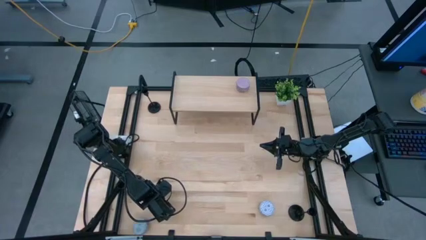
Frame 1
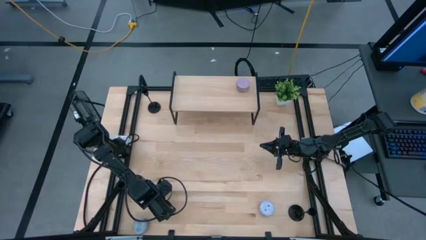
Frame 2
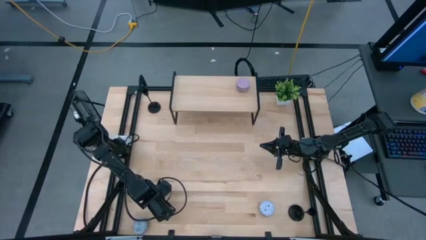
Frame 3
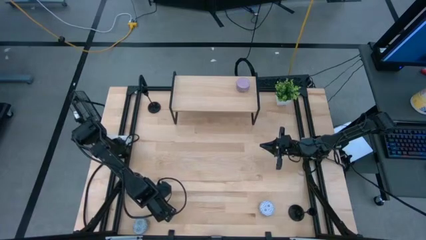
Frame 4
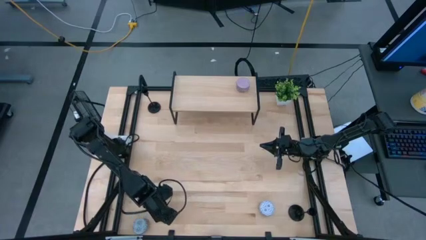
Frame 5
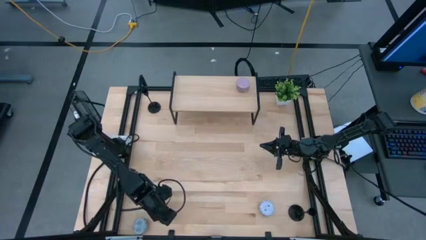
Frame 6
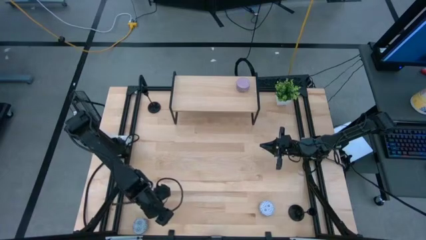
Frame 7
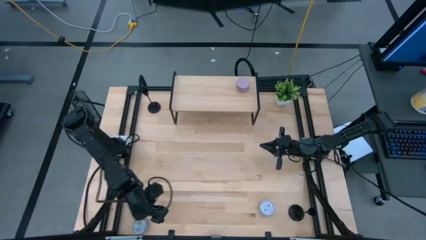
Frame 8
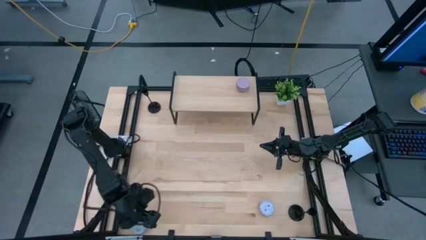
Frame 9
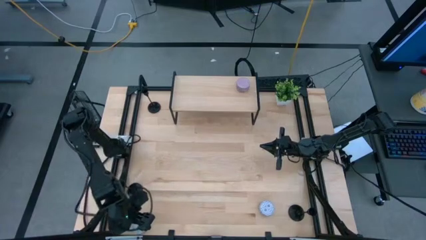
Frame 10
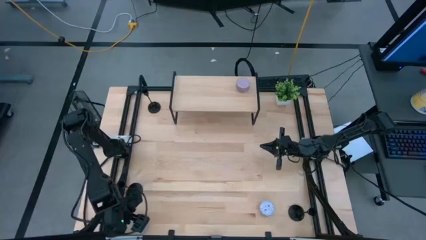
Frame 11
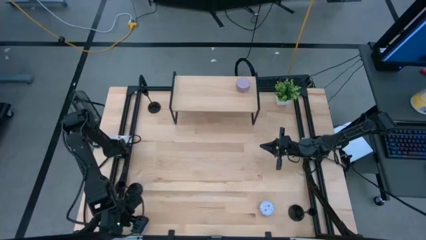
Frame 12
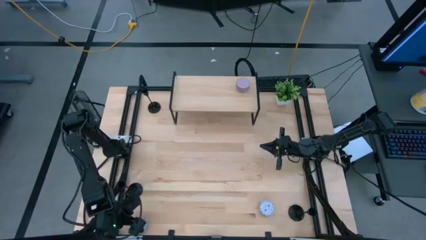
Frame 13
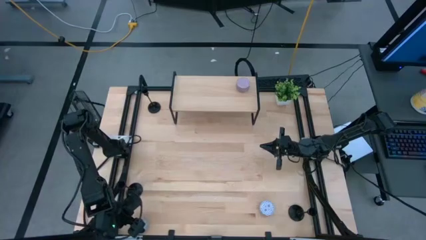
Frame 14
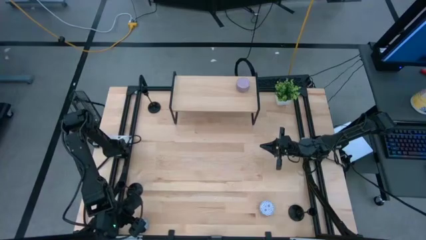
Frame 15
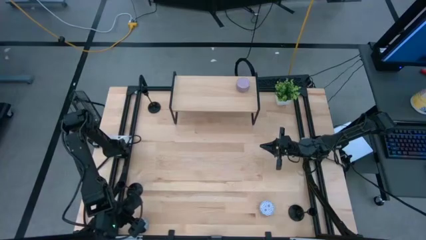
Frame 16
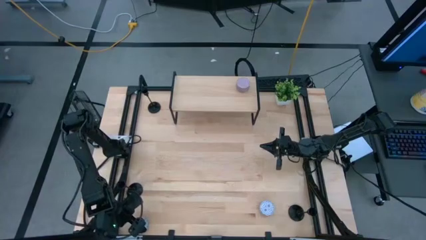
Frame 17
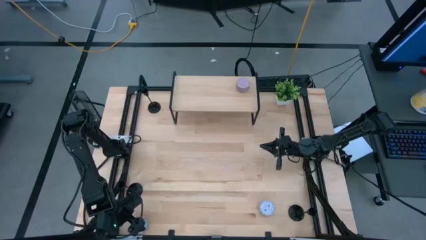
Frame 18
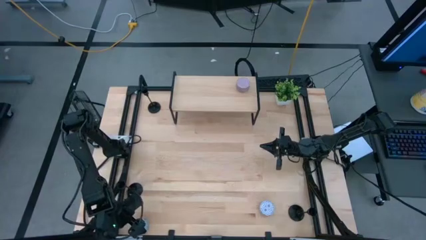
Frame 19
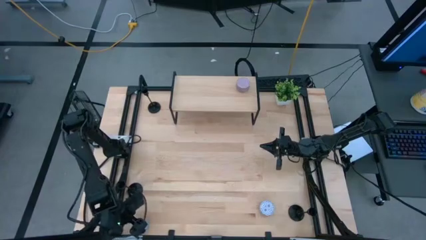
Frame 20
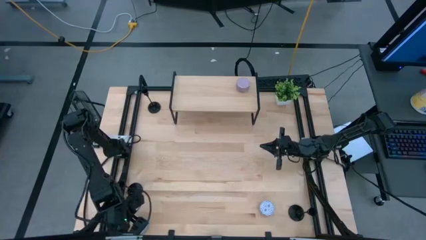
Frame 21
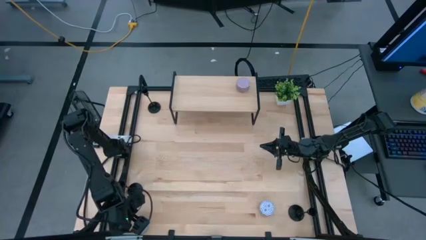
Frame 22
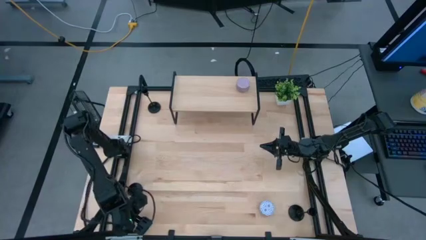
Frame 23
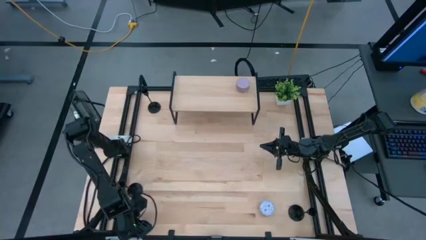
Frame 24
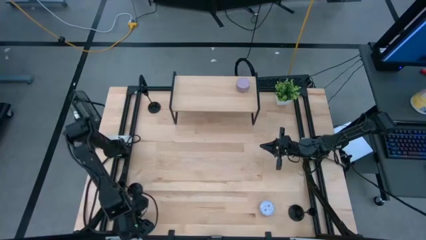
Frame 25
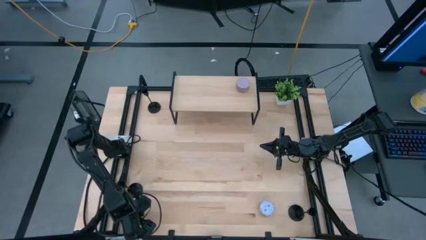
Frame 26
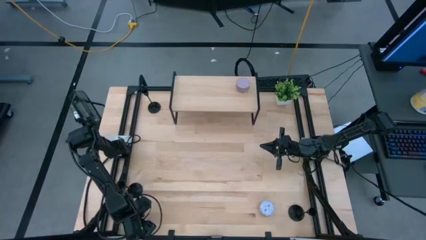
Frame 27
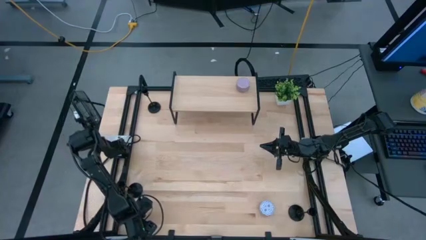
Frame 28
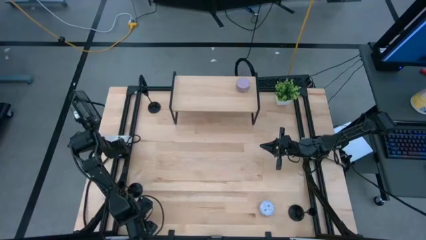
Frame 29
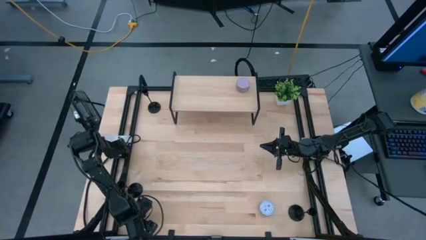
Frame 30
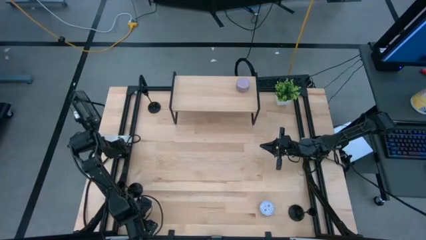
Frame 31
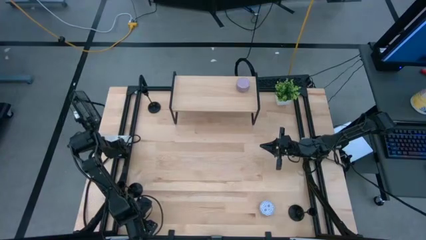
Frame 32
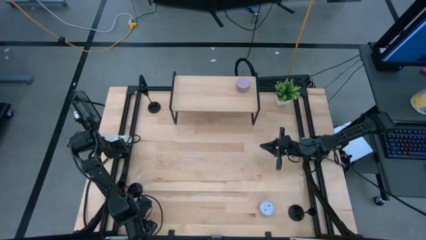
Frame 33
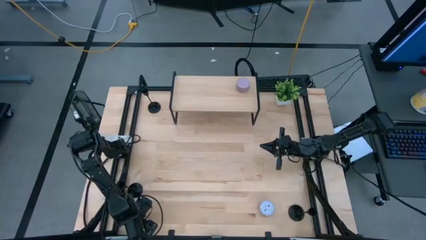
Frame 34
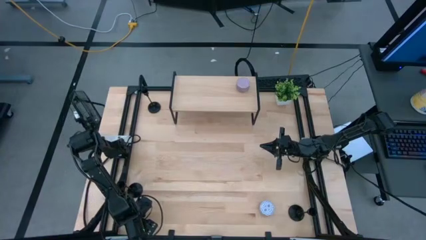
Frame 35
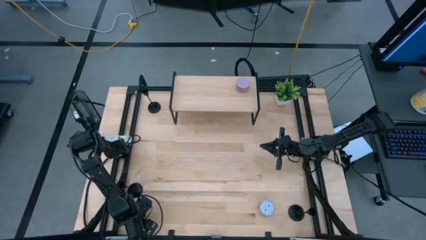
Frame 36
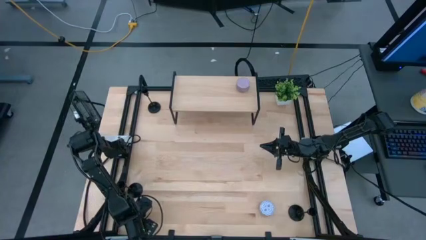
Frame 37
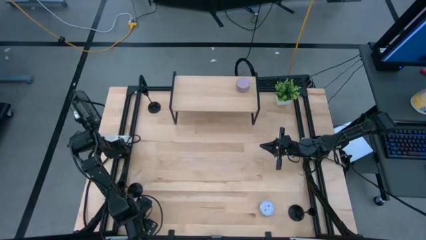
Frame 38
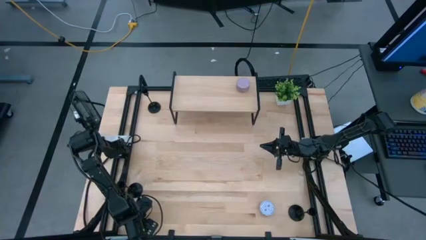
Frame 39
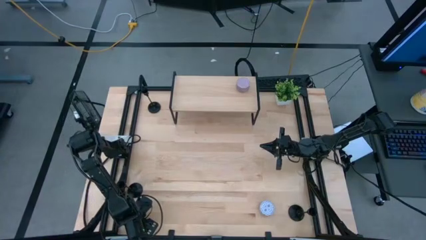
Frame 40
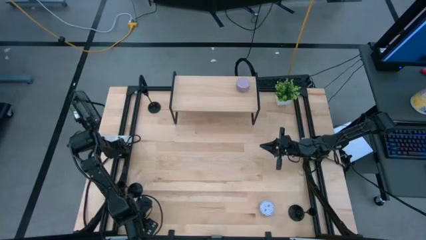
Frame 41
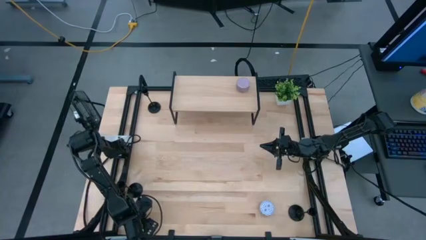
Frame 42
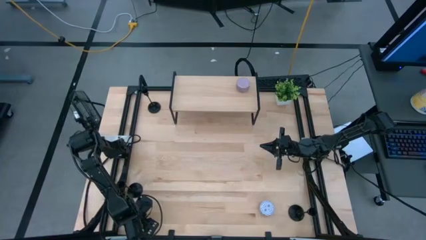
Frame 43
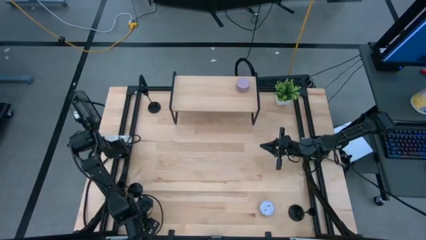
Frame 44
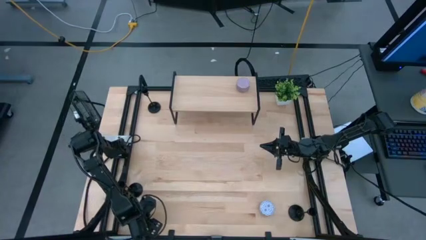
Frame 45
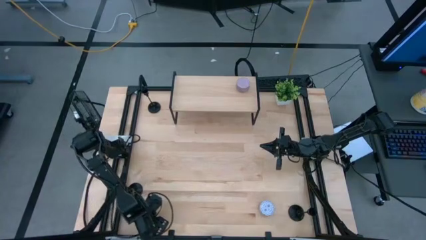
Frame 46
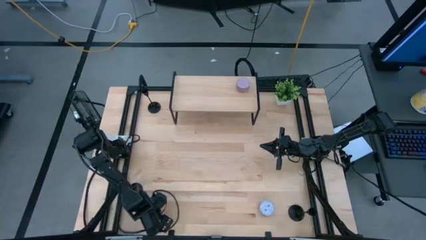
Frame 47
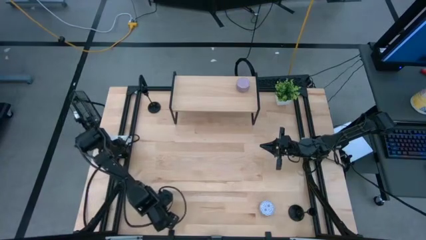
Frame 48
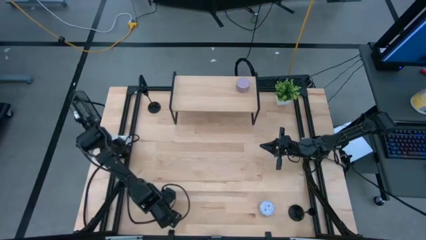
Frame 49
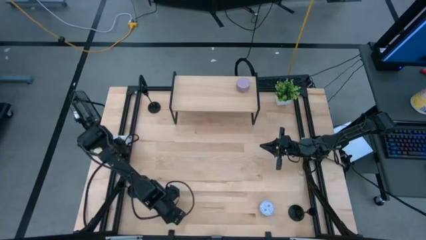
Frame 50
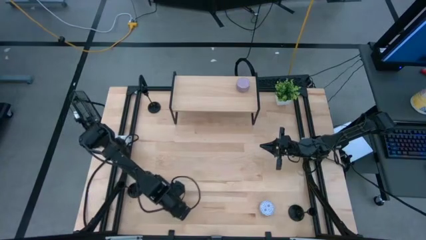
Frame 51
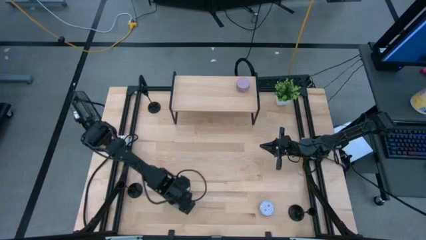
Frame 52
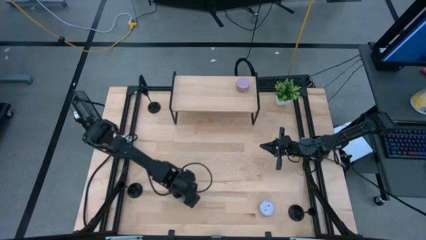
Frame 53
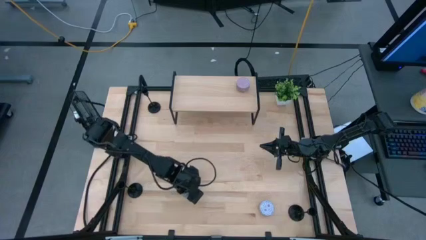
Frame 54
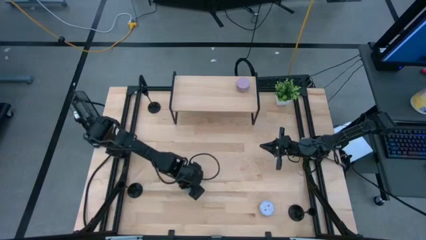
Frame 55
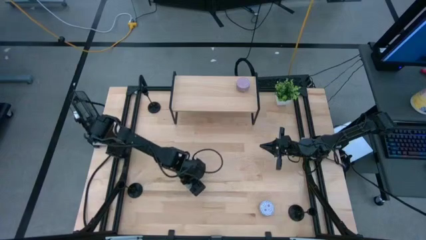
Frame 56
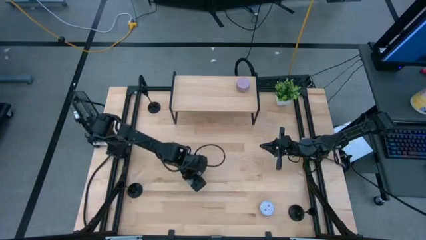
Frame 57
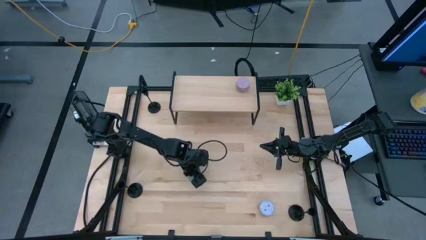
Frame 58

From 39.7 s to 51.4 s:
Task: Pick & Place candle stick holders
Put the green scented candle on the shelf
